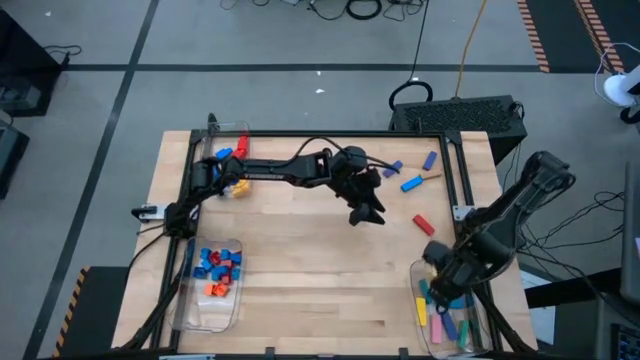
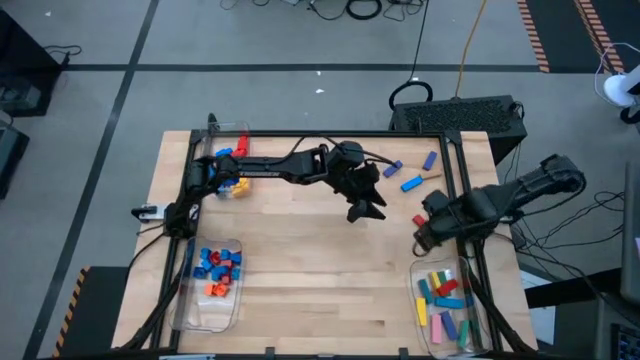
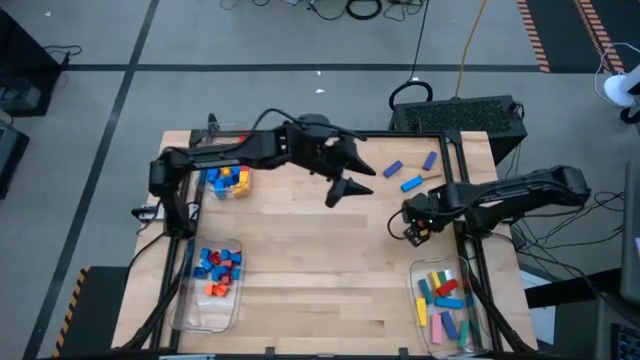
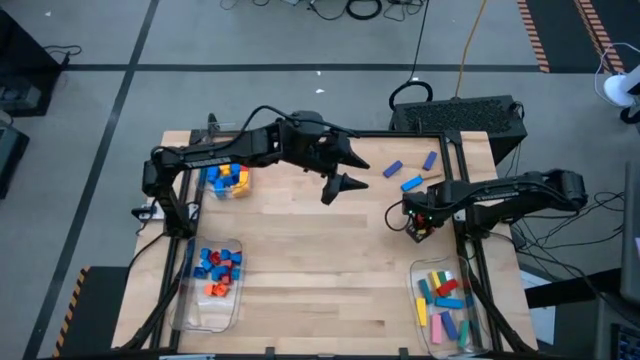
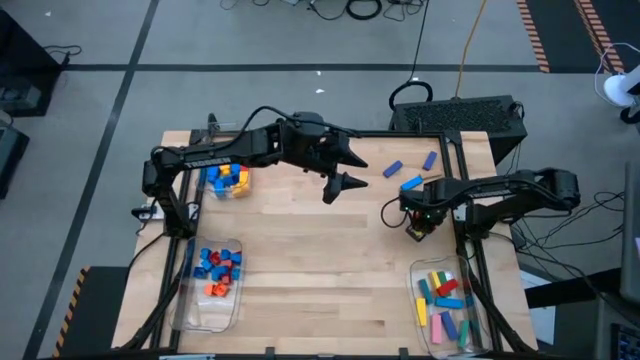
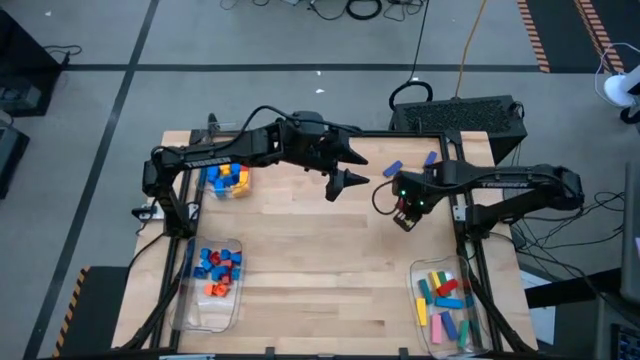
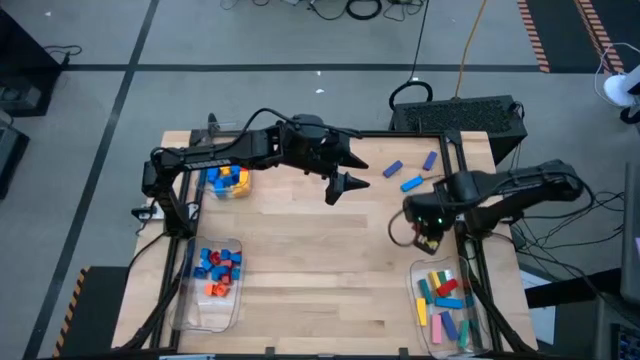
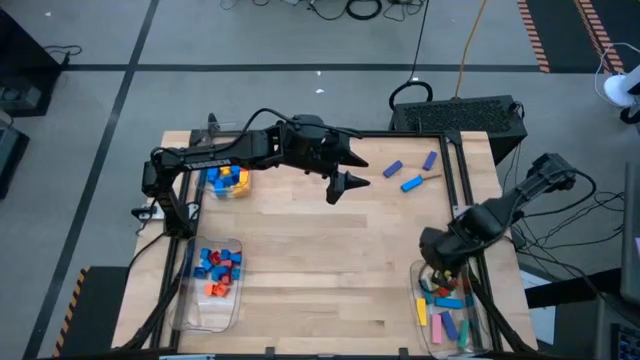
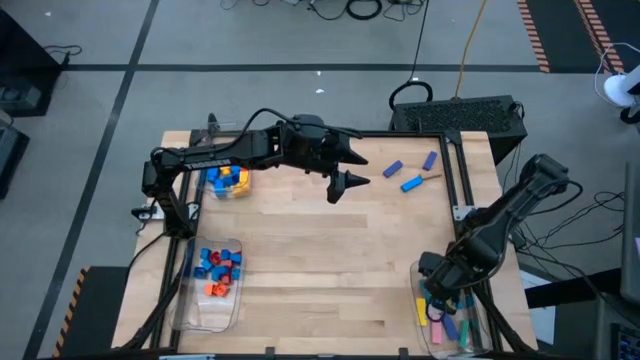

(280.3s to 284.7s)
Task: Sort blocks by size
Put the red rectangular block into the bottom right transparent bin

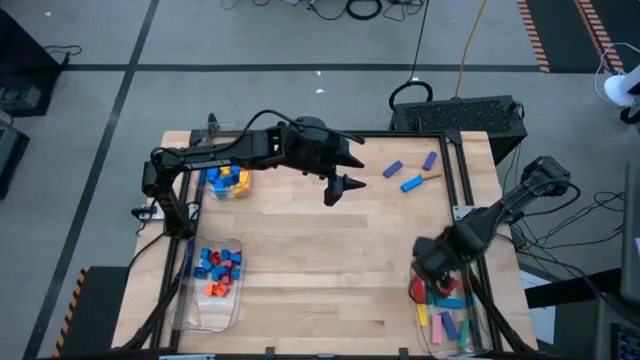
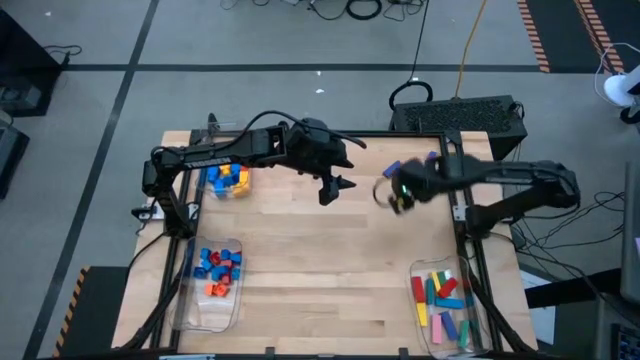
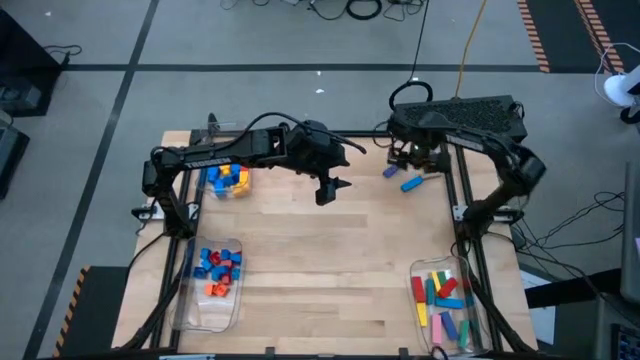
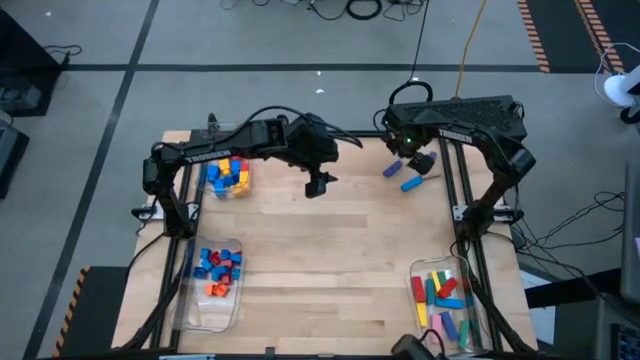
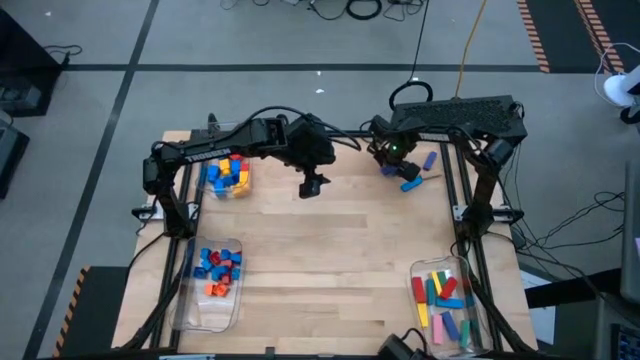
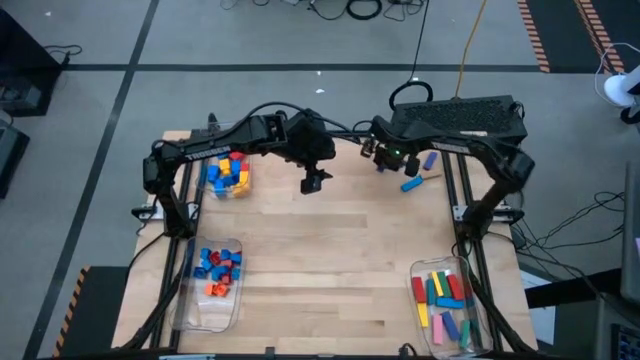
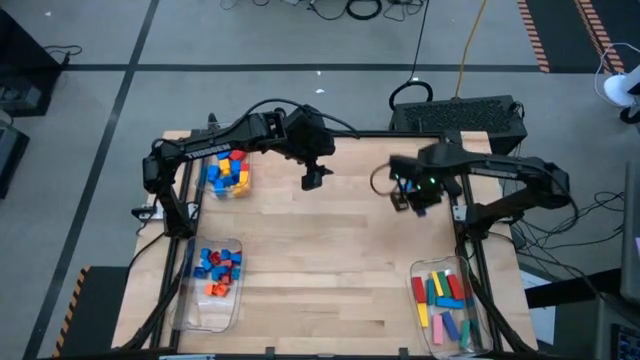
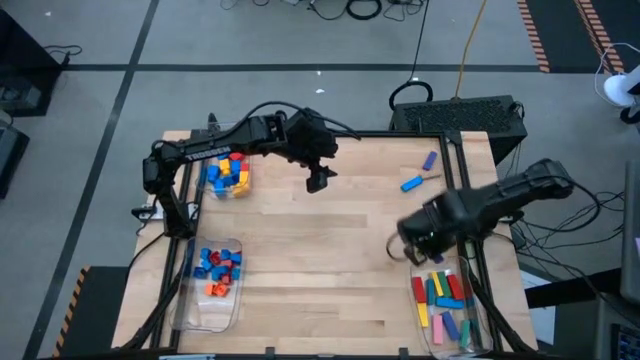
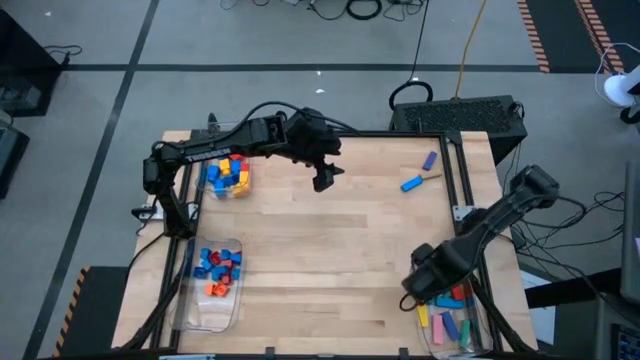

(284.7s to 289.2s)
Put the blue rectangular block into the bottom right transparent bin

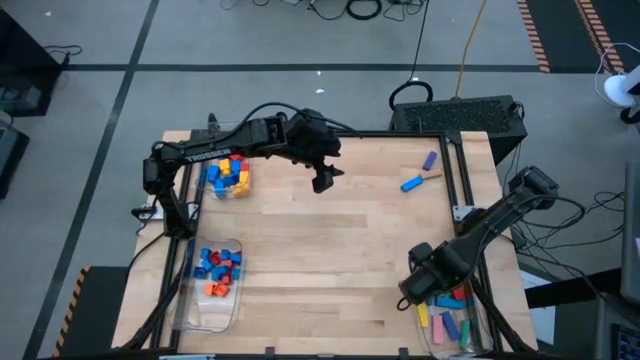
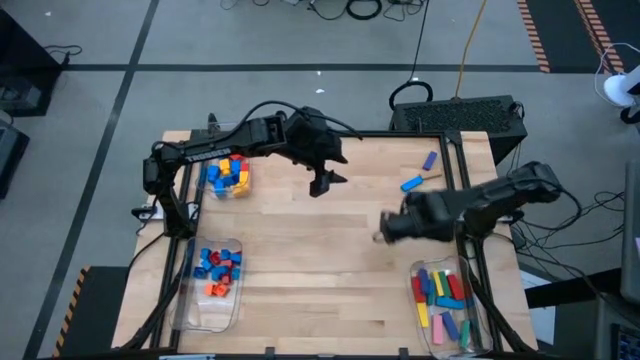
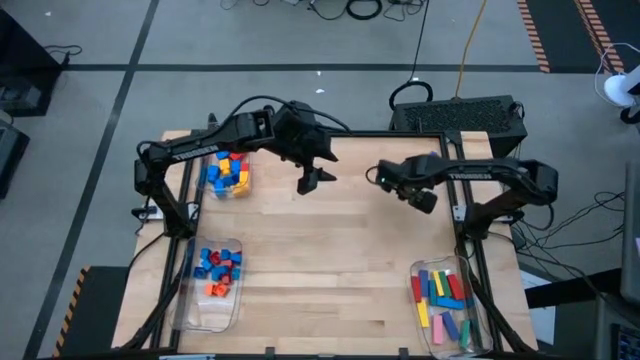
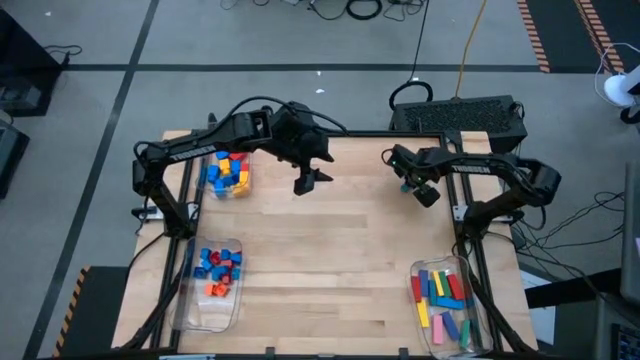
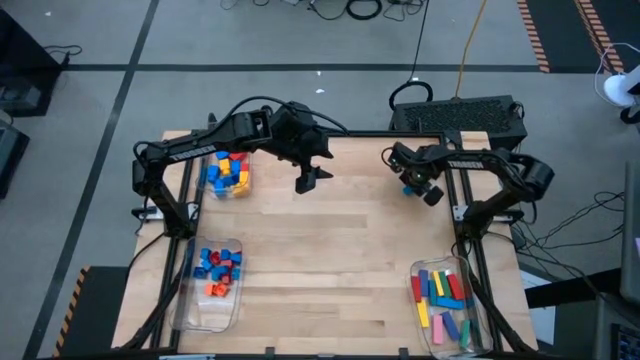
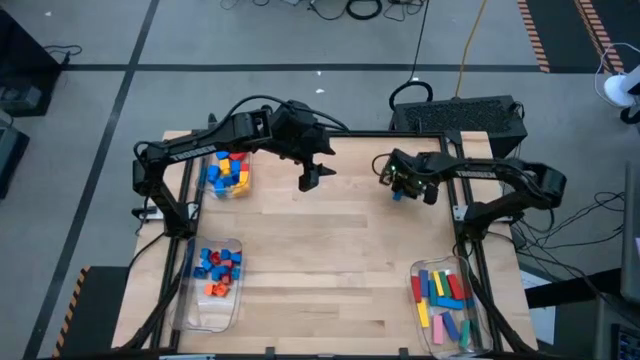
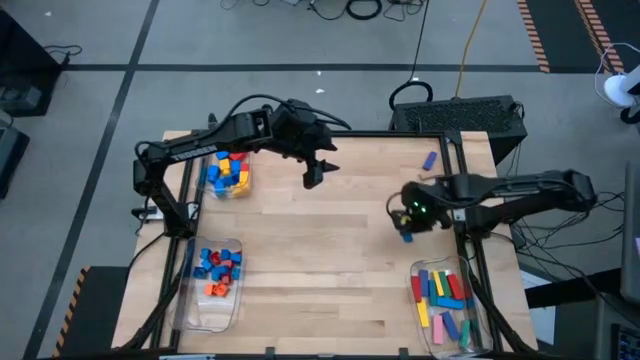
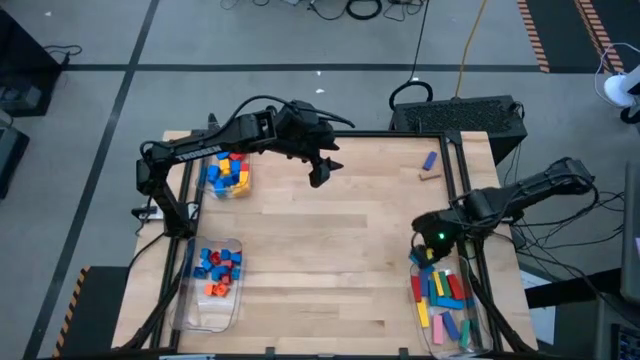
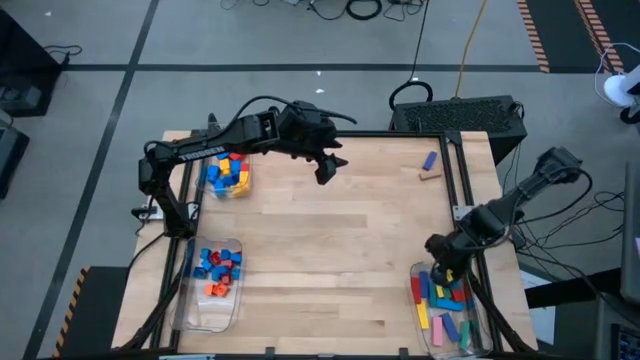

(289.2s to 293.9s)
Put the blue rectangular block into the bottom right transparent bin

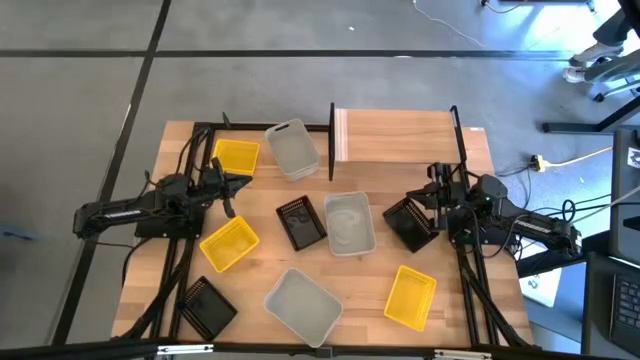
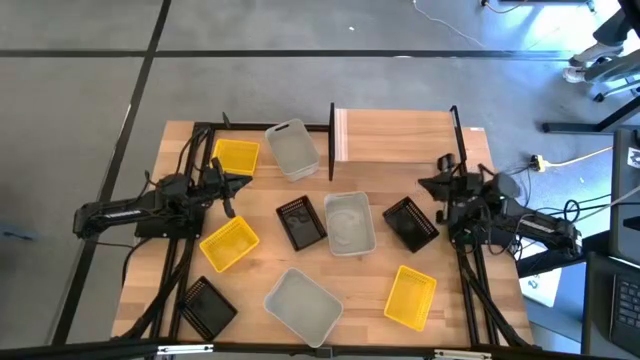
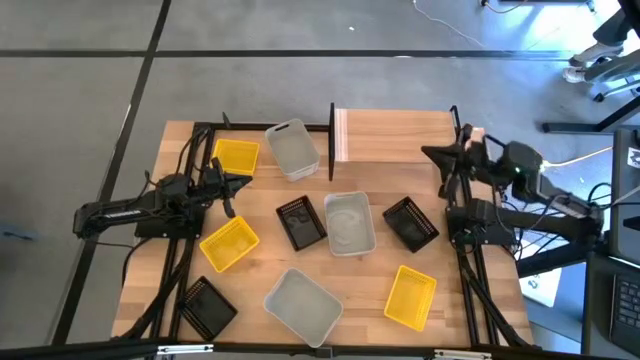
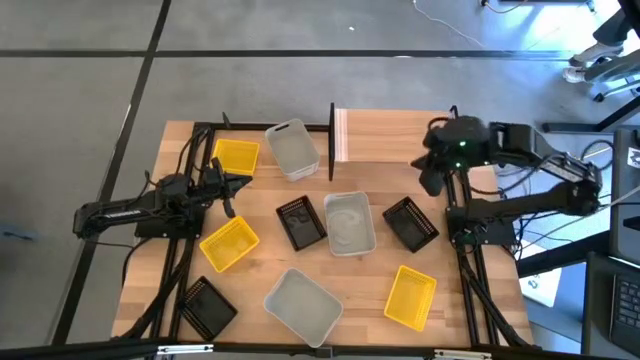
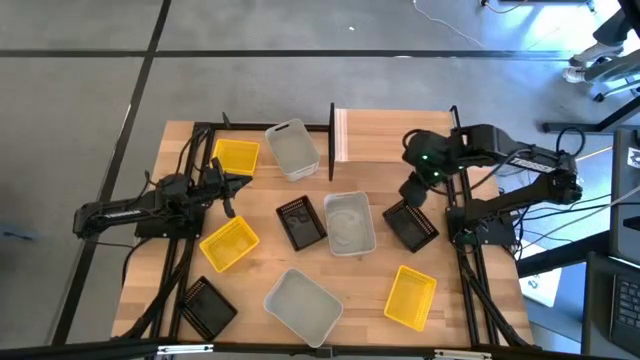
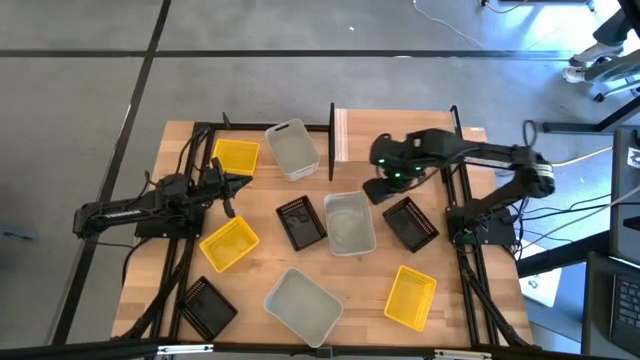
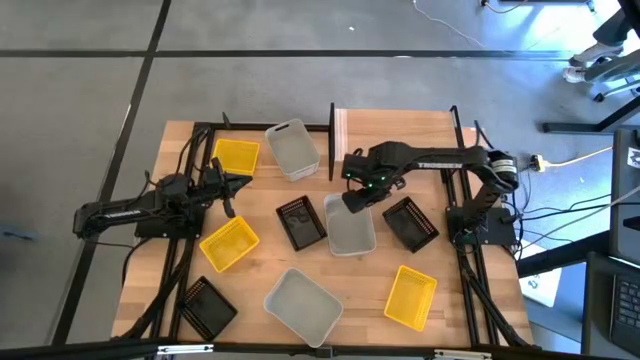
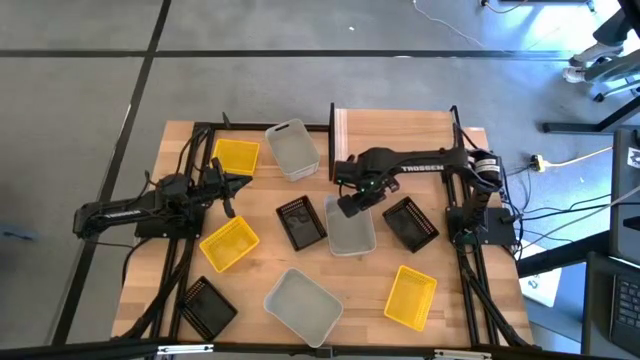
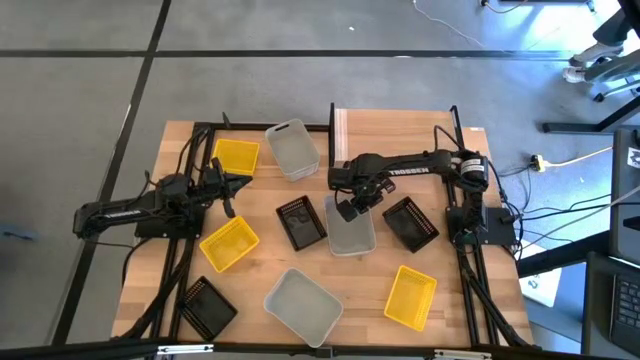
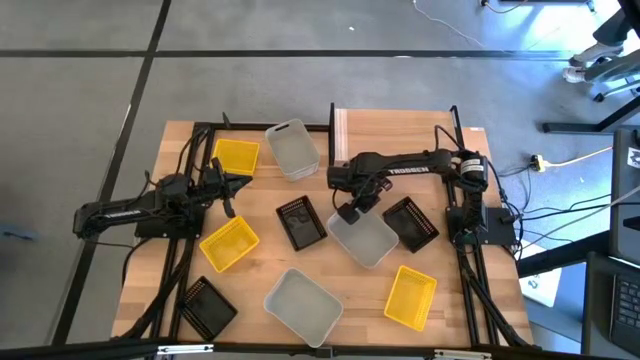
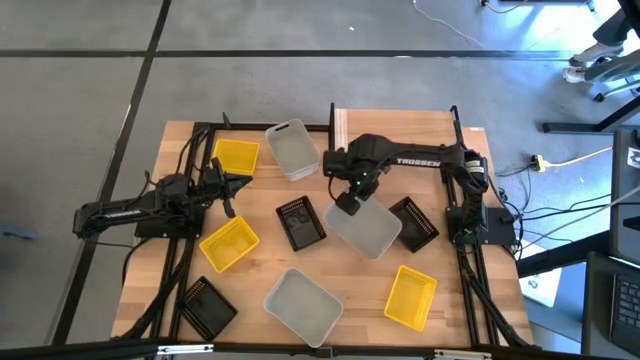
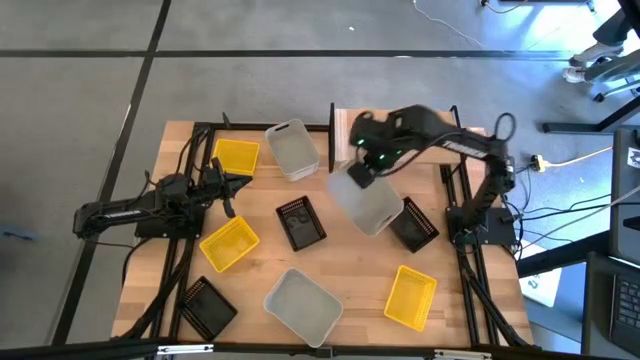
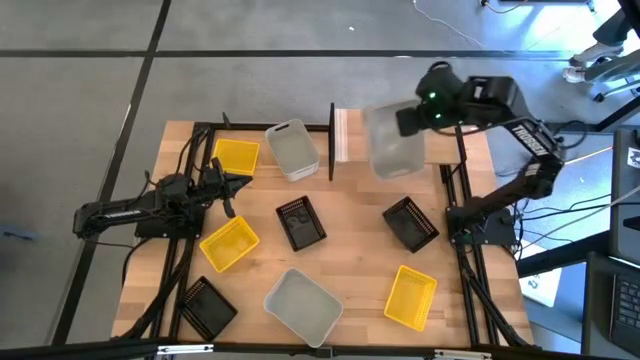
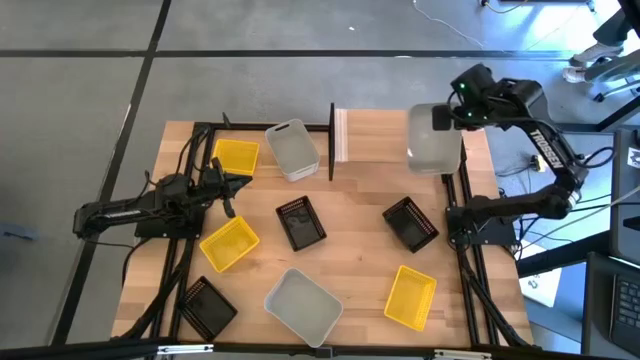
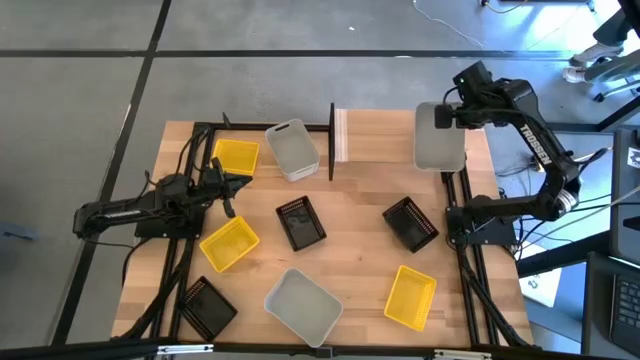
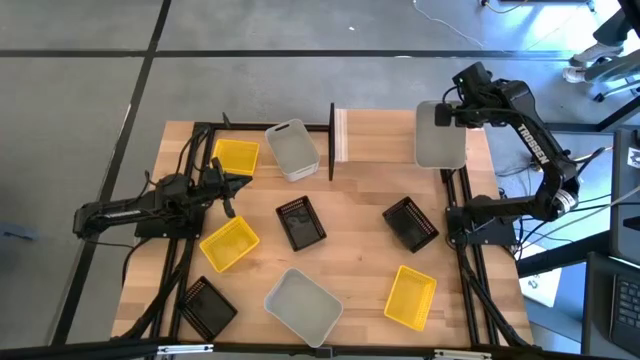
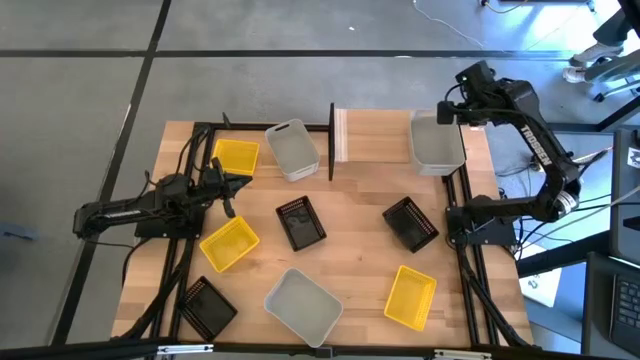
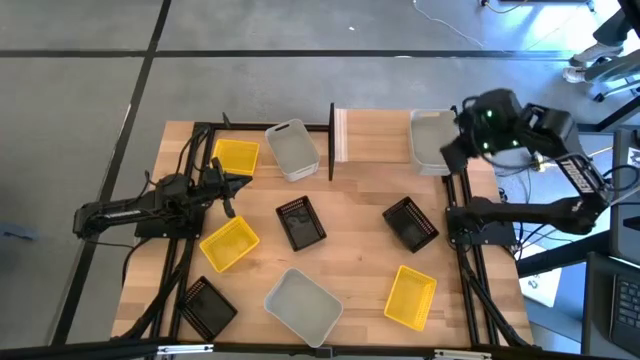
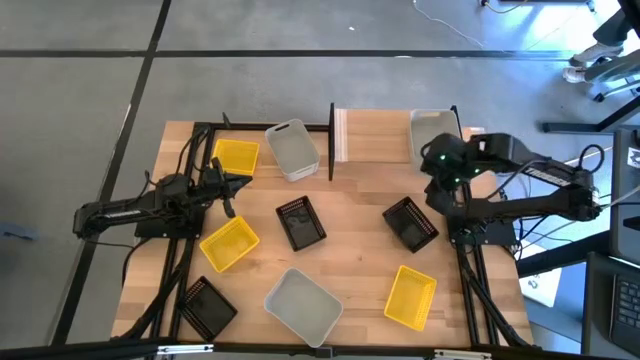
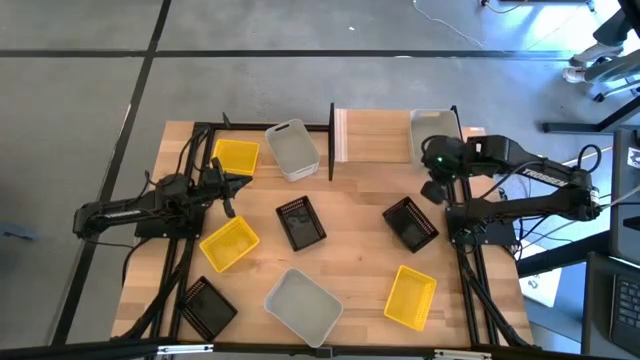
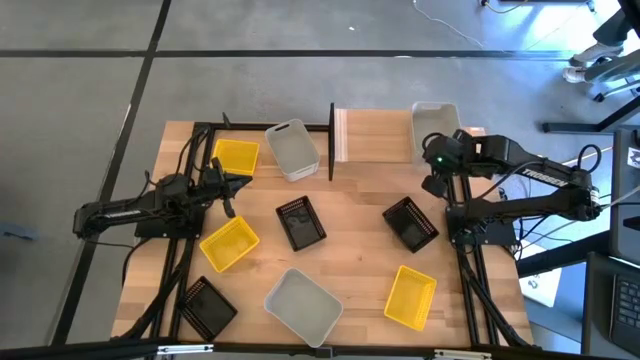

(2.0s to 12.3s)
Task: Stack baskets on shelf by color
Put the middle right white bin on the shelf
